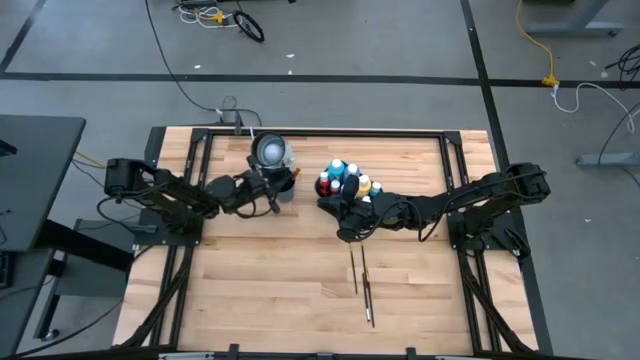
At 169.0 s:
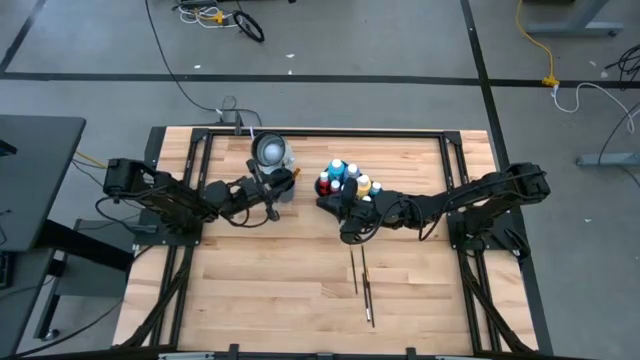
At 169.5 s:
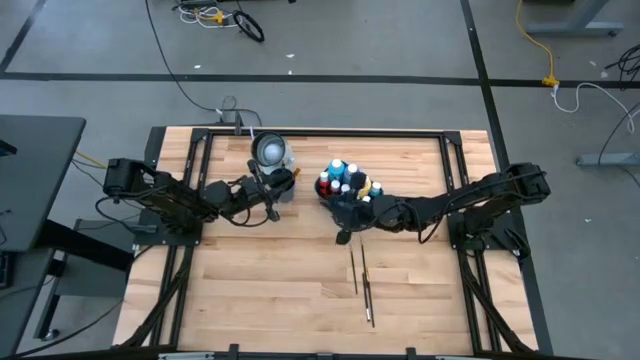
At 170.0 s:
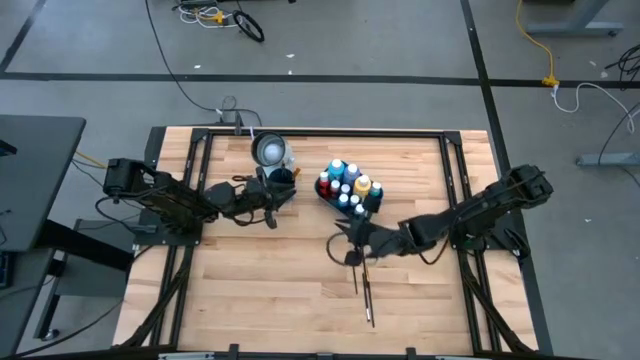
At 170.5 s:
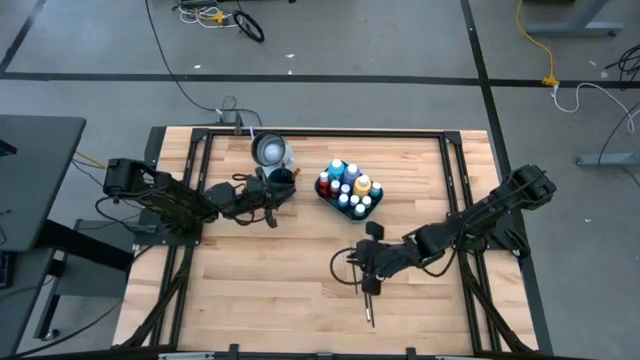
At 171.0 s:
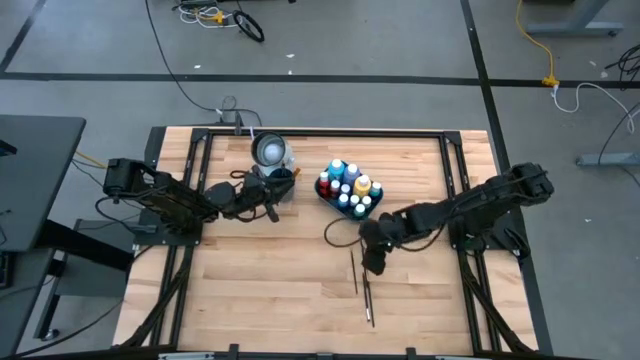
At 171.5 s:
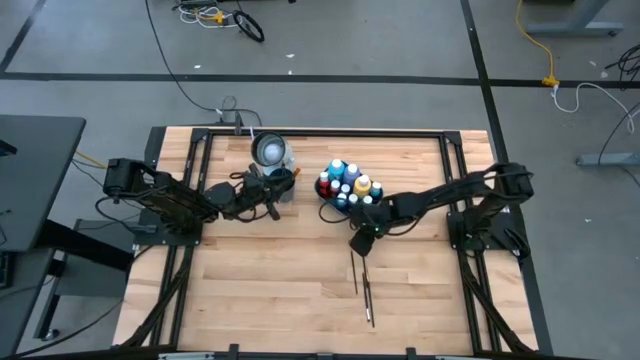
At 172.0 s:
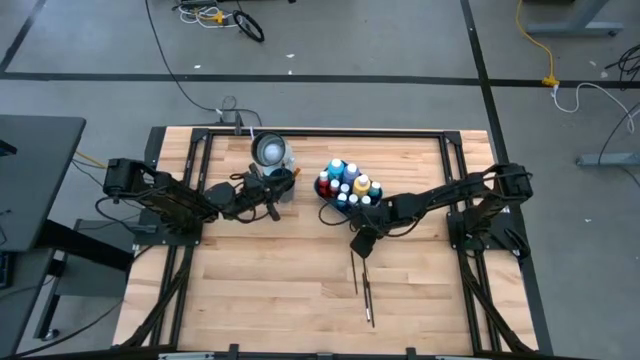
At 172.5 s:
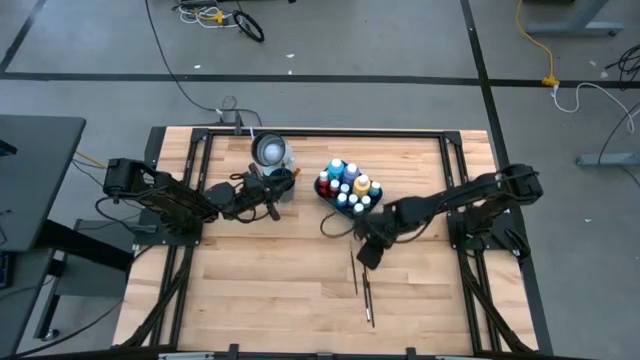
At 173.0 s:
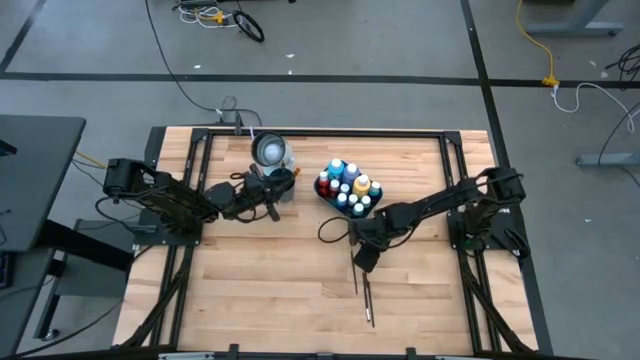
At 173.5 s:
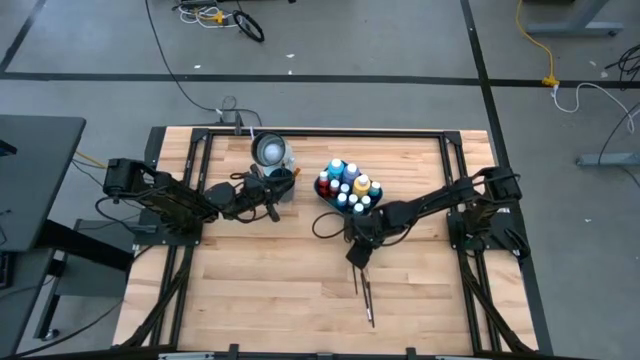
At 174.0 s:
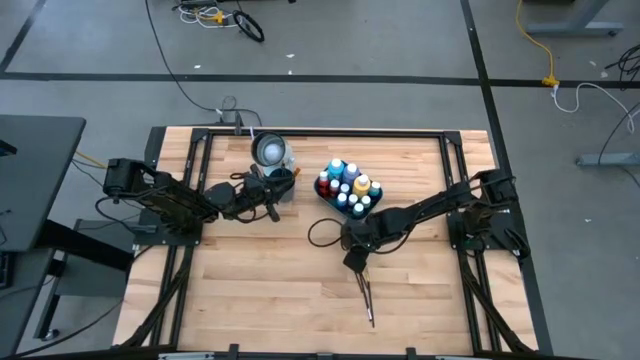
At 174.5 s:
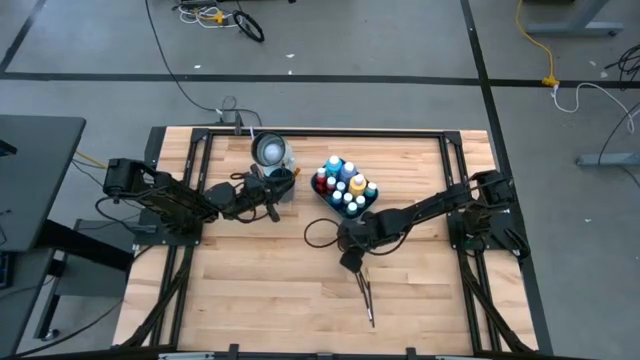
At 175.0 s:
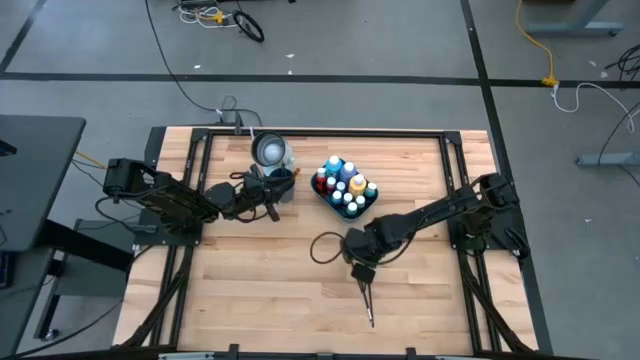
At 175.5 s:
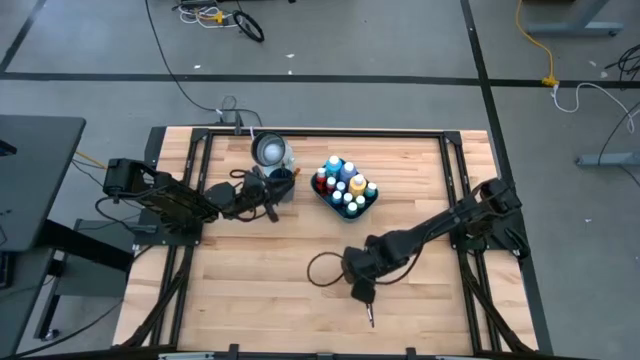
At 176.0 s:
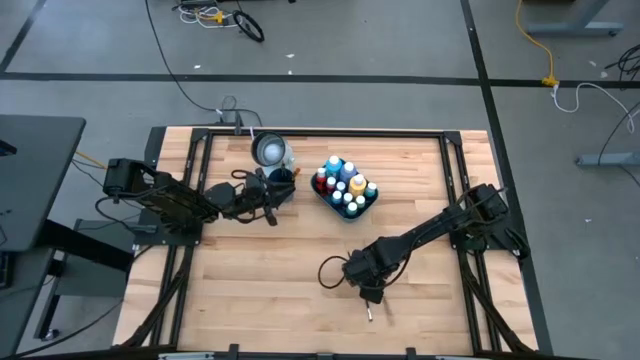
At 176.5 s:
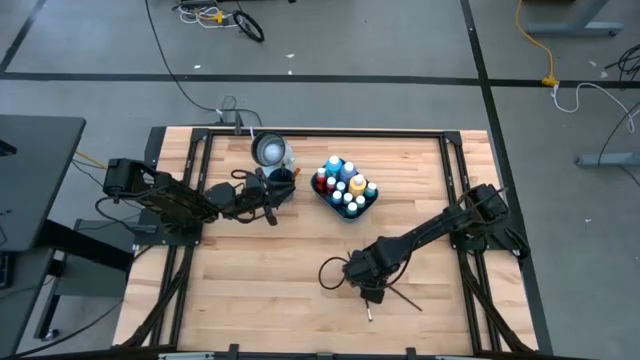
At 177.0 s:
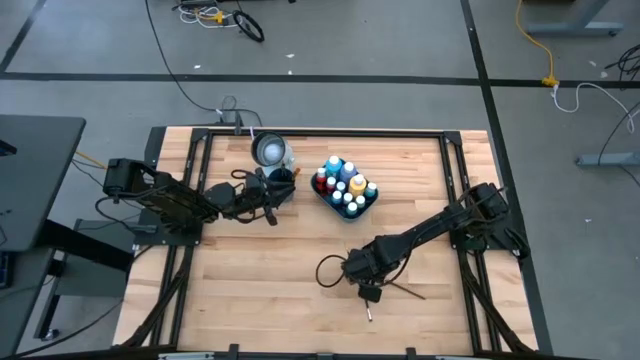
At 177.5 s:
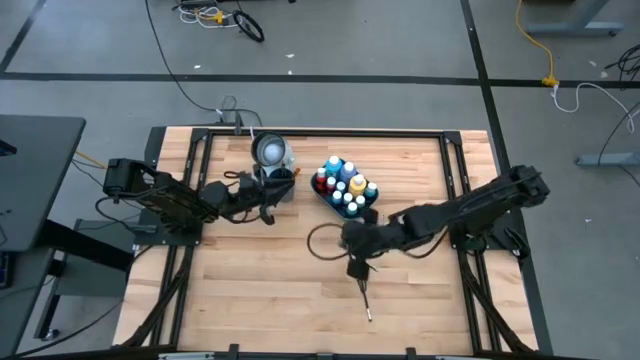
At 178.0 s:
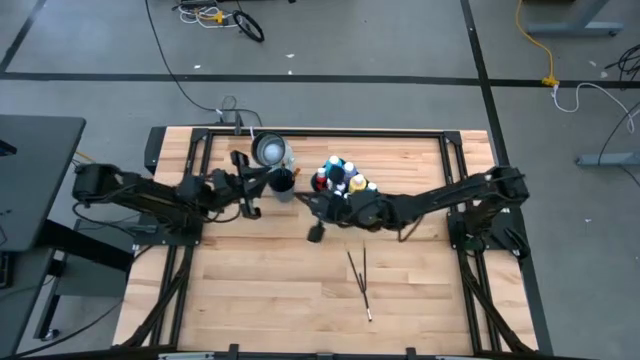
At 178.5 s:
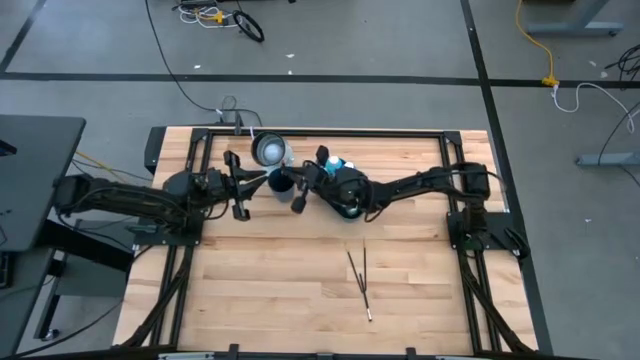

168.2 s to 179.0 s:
Task: Pick & Place Paint Supplies
Put the gold paint brush into the blue cup

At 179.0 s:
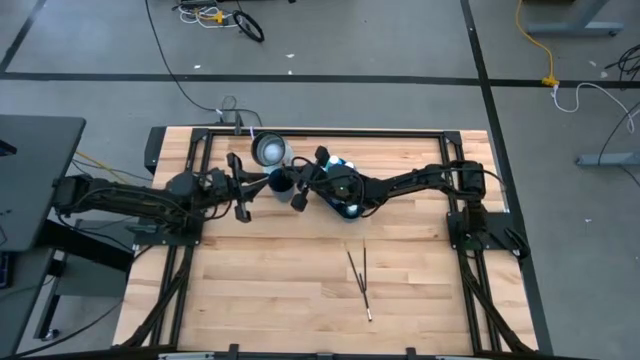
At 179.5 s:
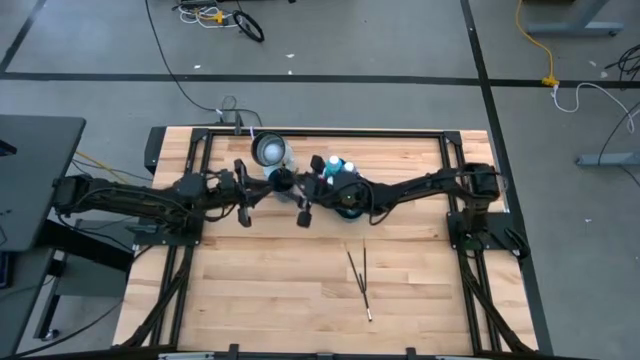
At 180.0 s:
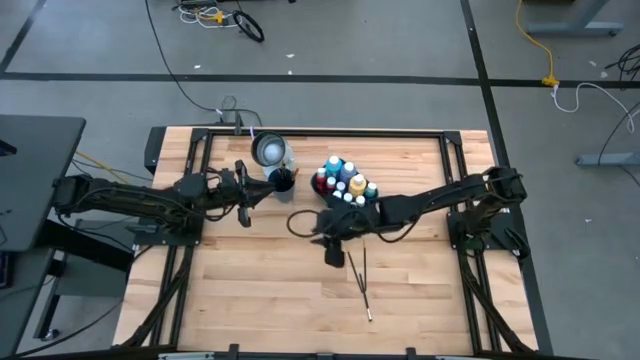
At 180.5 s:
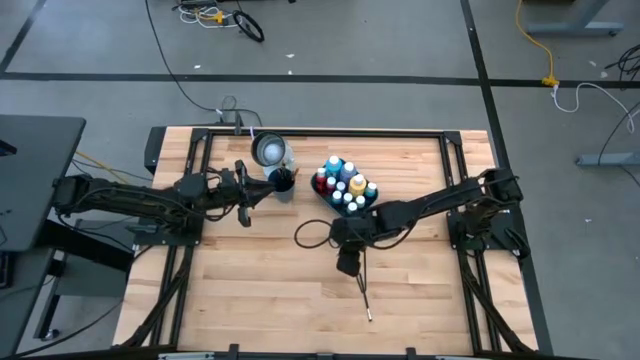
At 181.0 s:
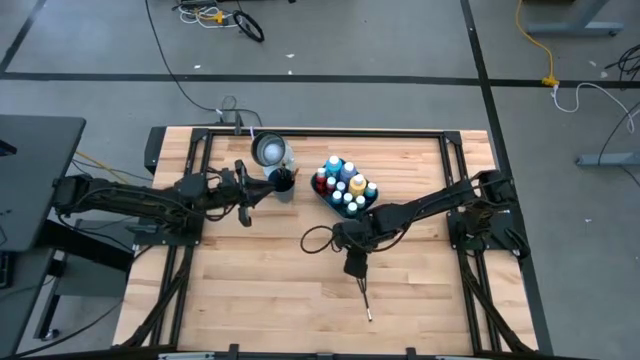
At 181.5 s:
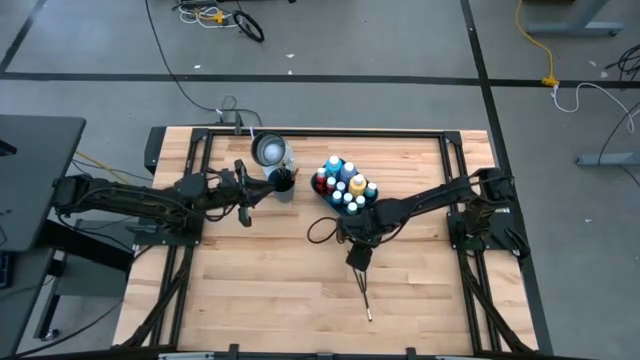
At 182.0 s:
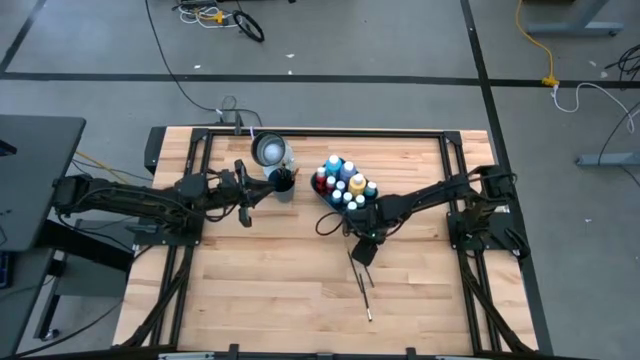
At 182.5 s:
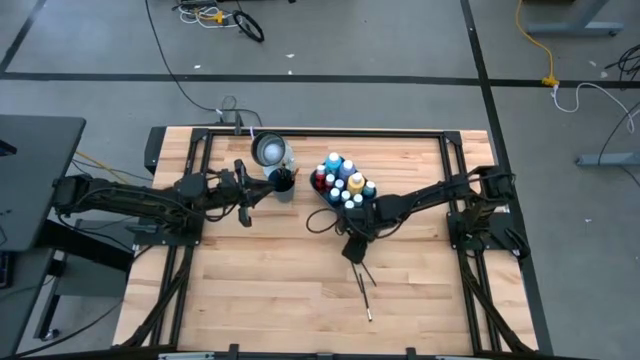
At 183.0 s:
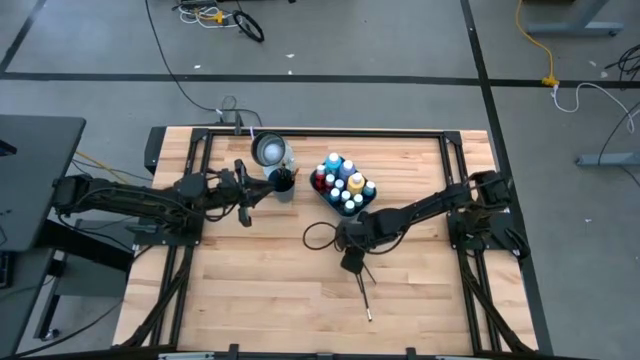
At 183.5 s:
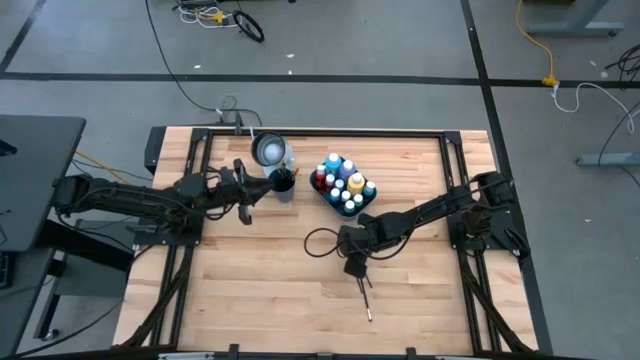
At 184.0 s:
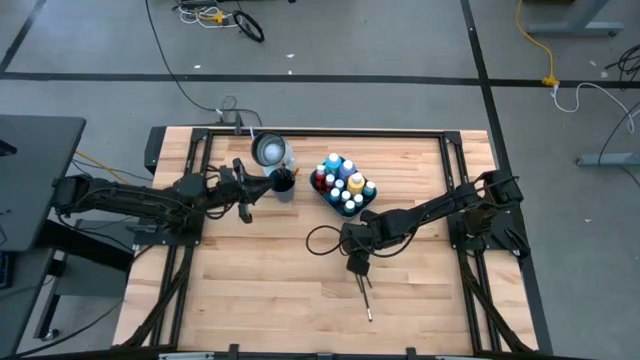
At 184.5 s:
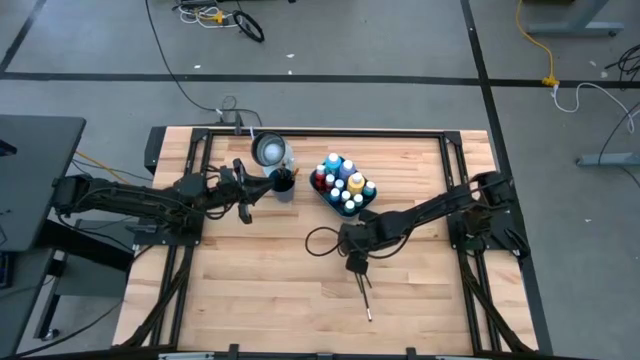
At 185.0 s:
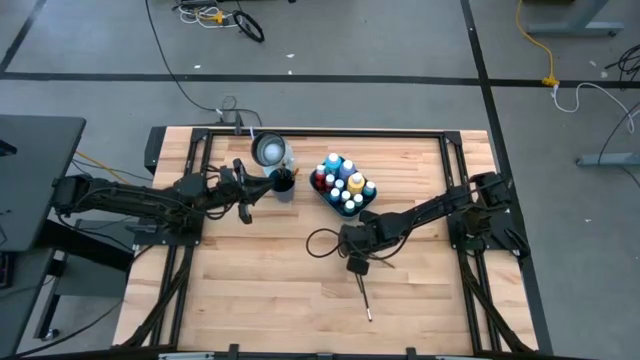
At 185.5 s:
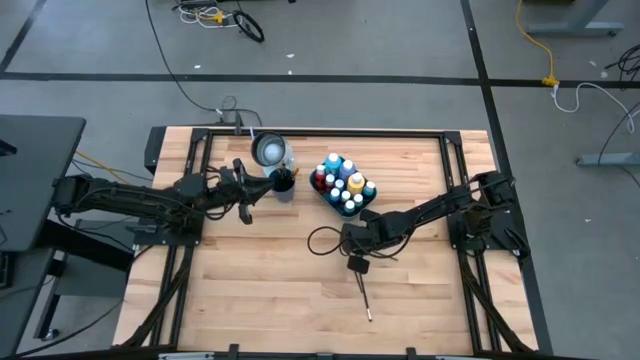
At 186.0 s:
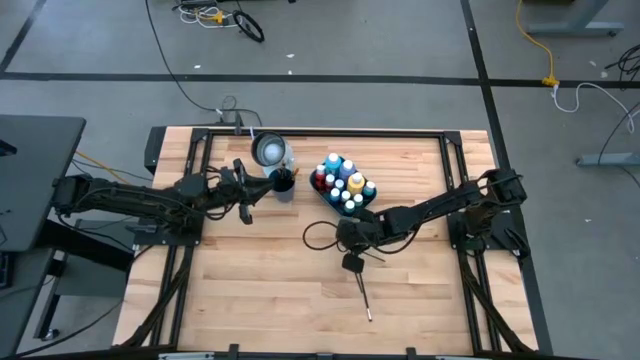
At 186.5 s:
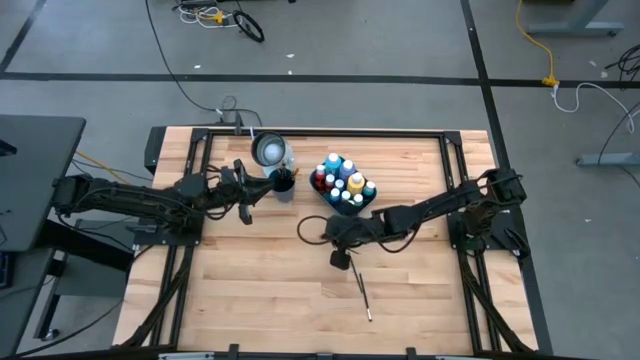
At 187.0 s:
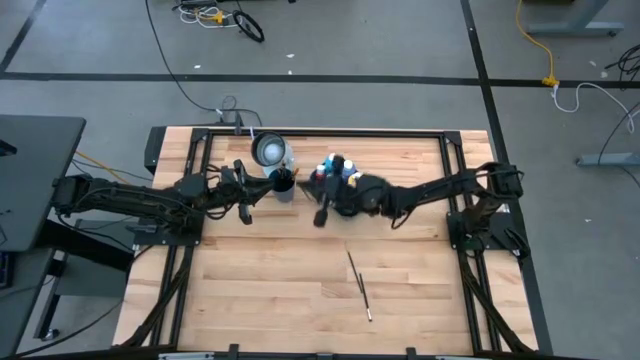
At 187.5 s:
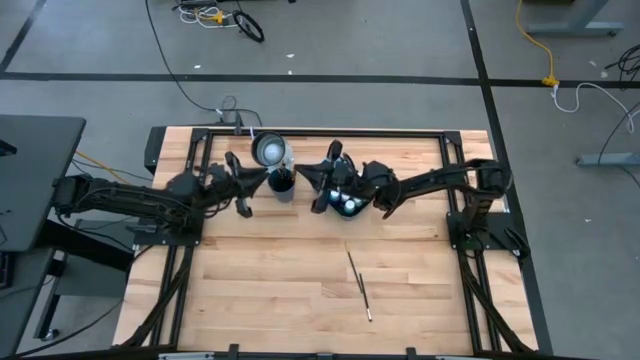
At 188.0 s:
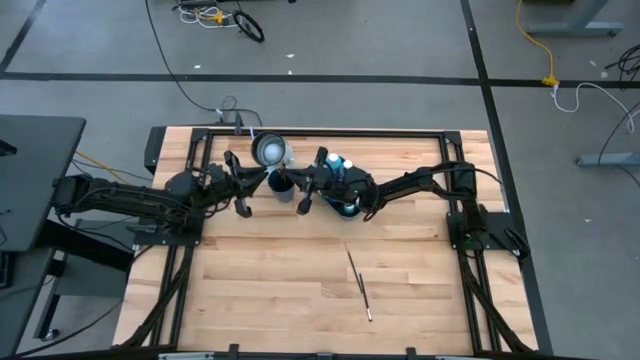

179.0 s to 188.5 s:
Put the gold paint brush into the blue cup
